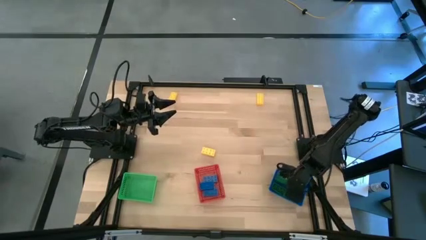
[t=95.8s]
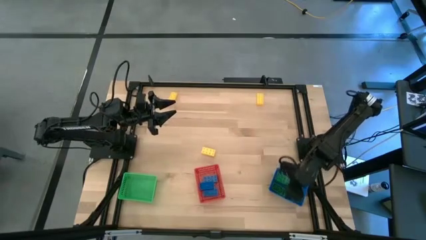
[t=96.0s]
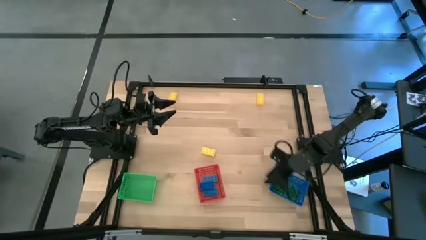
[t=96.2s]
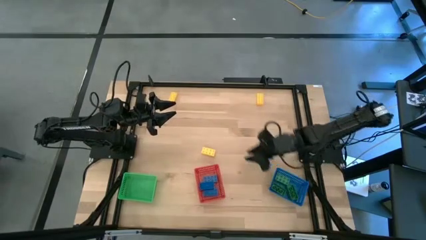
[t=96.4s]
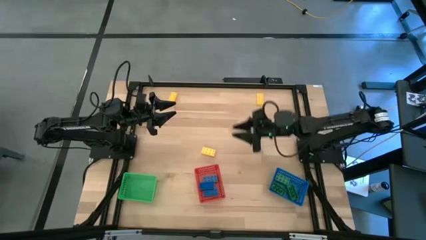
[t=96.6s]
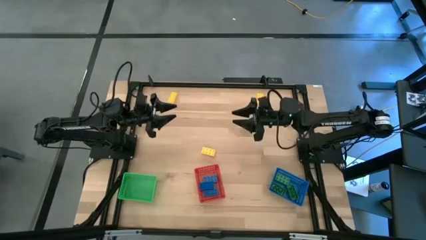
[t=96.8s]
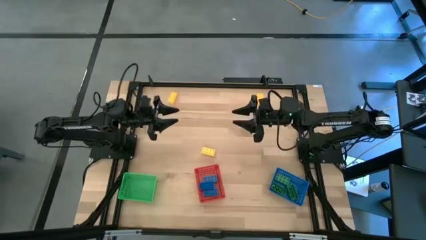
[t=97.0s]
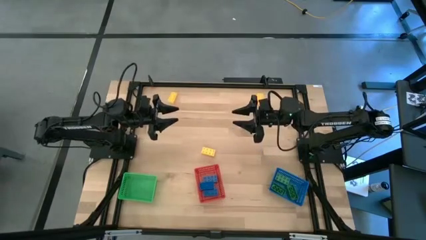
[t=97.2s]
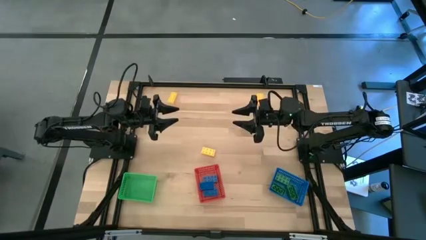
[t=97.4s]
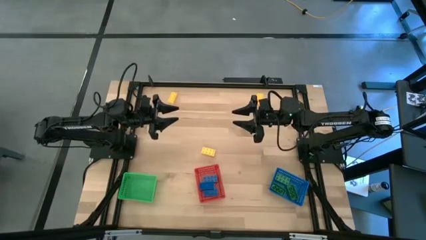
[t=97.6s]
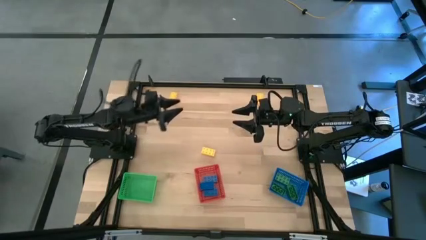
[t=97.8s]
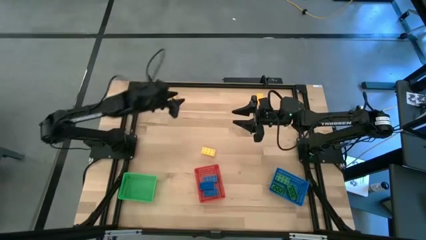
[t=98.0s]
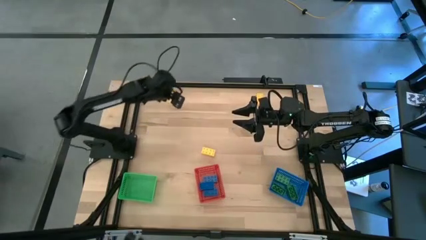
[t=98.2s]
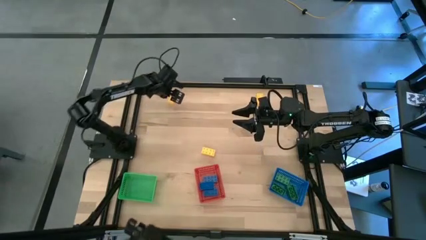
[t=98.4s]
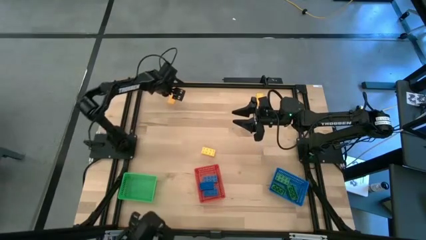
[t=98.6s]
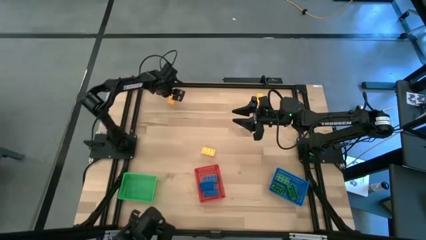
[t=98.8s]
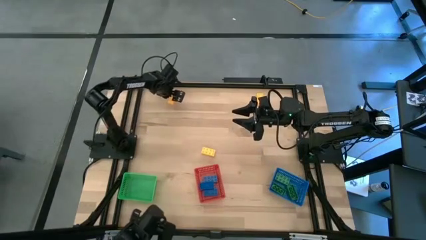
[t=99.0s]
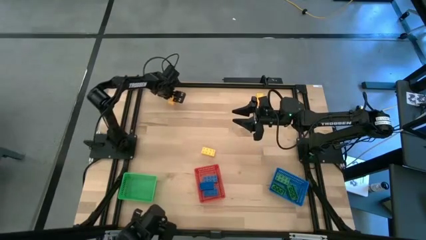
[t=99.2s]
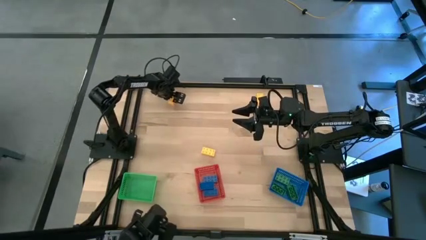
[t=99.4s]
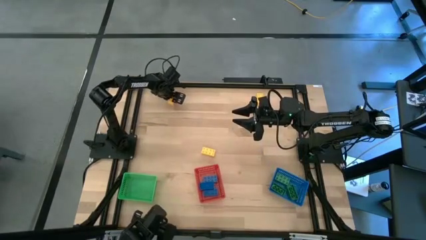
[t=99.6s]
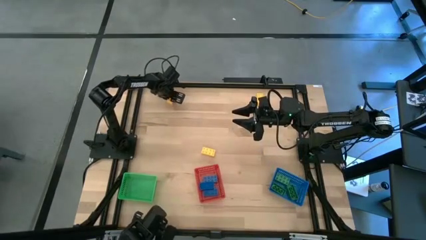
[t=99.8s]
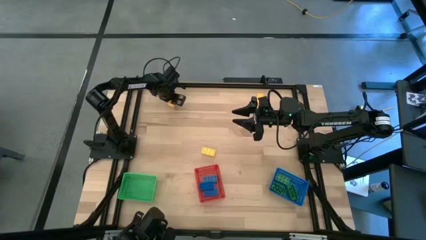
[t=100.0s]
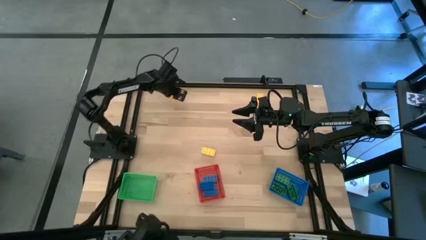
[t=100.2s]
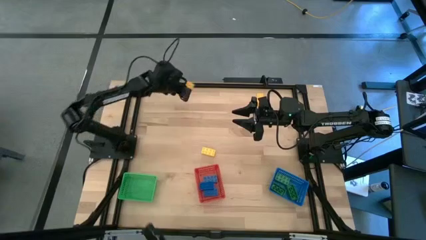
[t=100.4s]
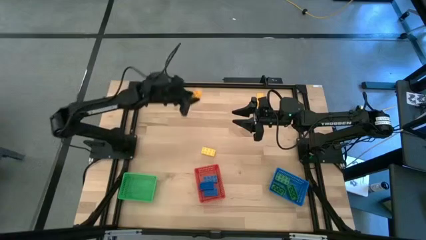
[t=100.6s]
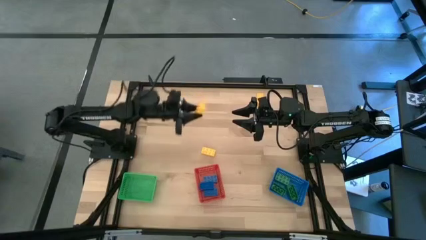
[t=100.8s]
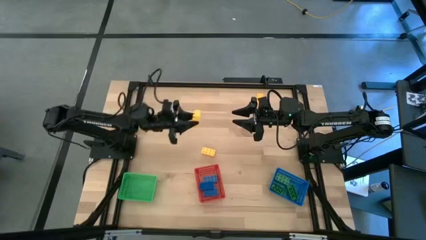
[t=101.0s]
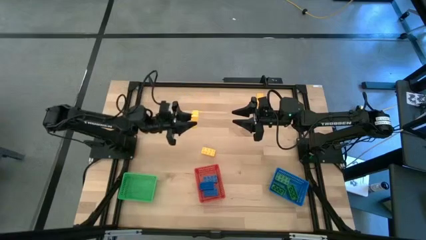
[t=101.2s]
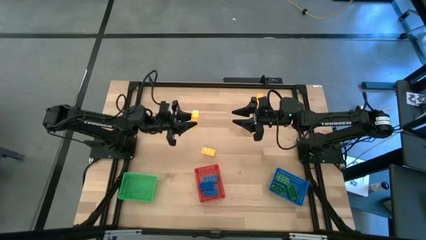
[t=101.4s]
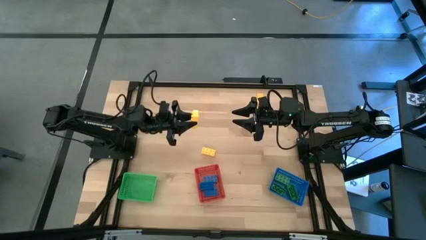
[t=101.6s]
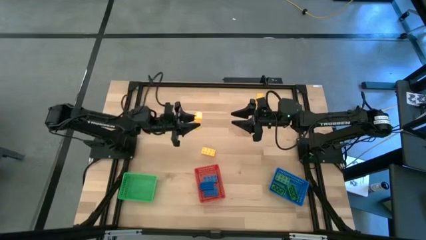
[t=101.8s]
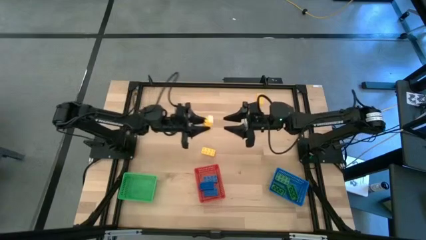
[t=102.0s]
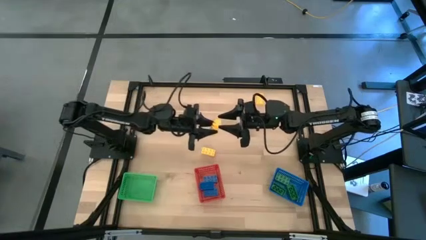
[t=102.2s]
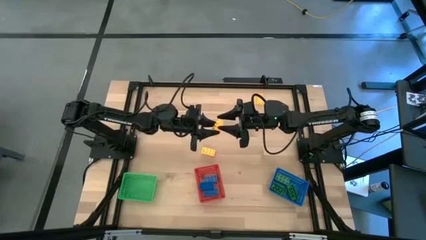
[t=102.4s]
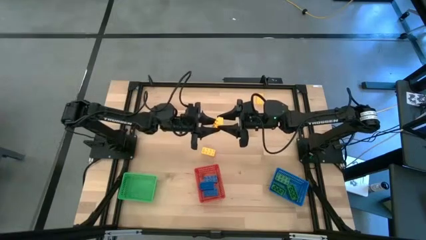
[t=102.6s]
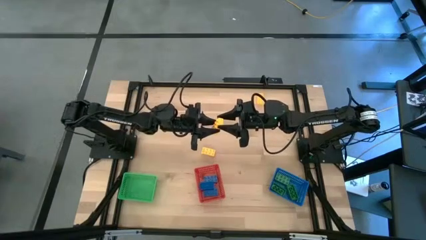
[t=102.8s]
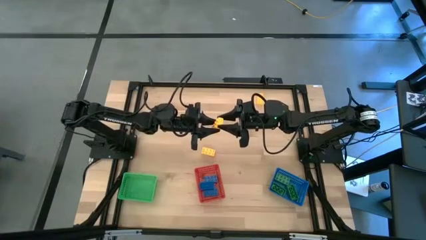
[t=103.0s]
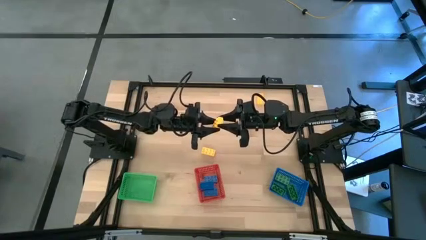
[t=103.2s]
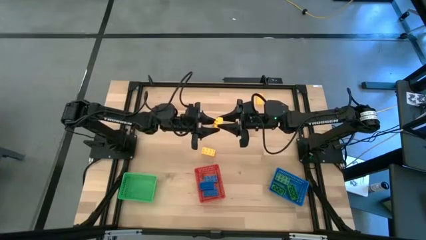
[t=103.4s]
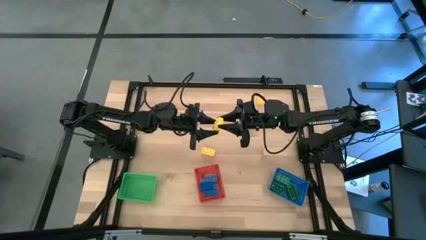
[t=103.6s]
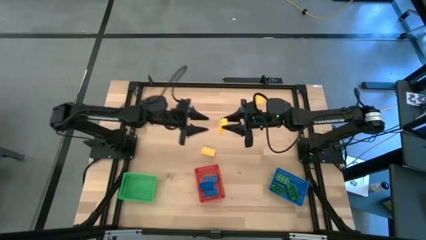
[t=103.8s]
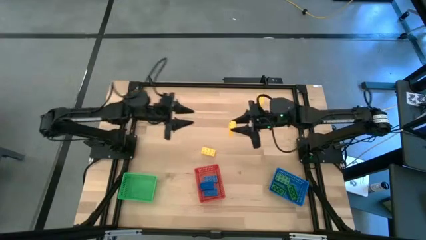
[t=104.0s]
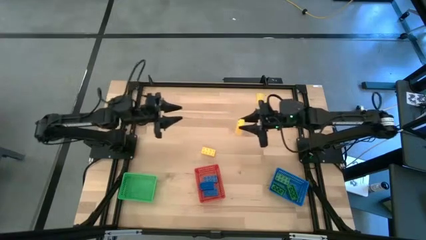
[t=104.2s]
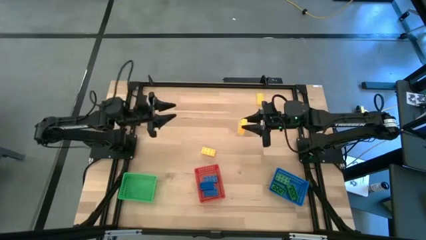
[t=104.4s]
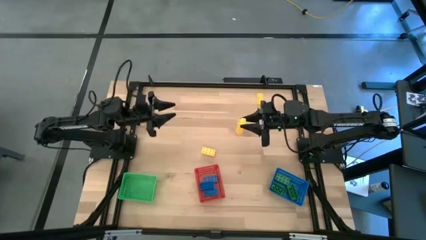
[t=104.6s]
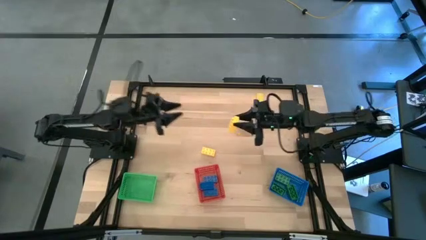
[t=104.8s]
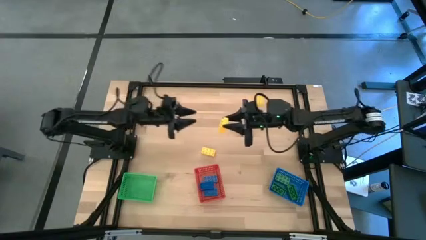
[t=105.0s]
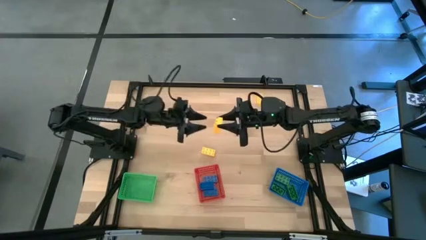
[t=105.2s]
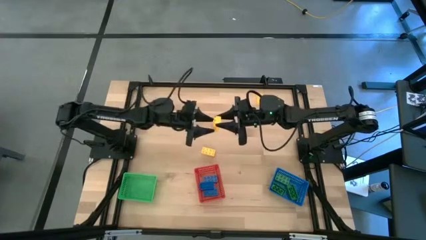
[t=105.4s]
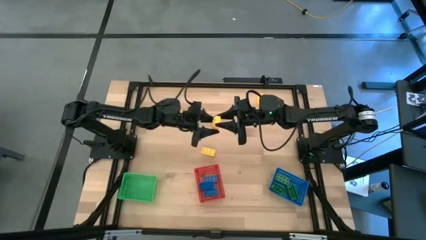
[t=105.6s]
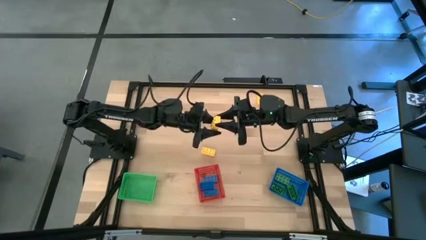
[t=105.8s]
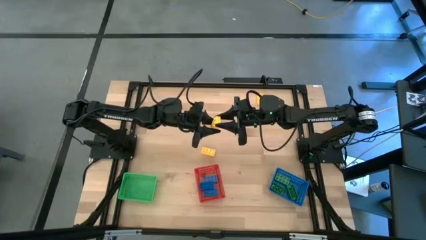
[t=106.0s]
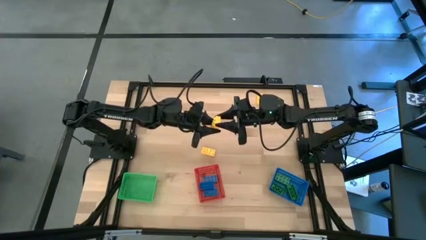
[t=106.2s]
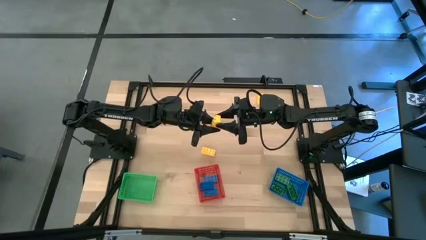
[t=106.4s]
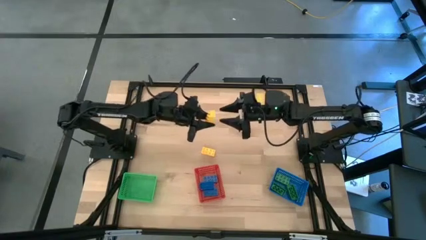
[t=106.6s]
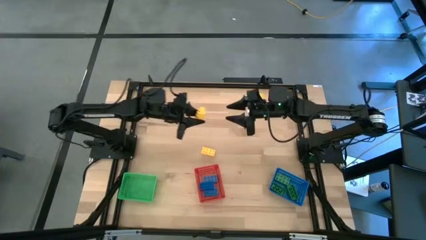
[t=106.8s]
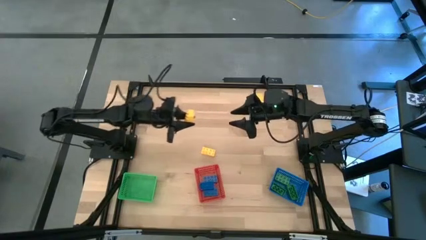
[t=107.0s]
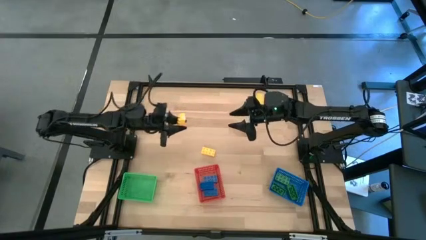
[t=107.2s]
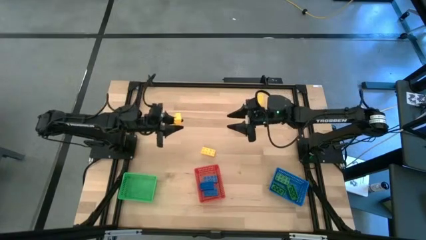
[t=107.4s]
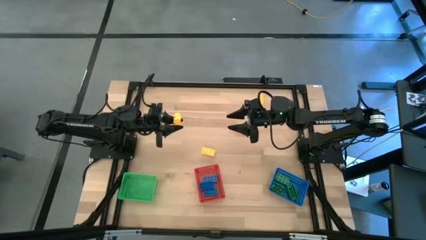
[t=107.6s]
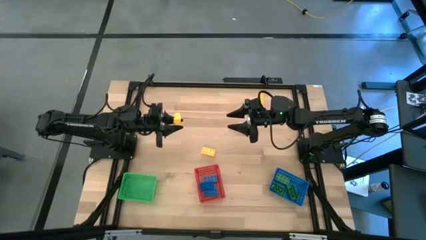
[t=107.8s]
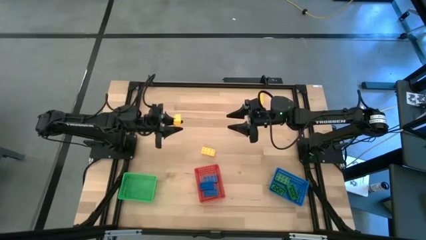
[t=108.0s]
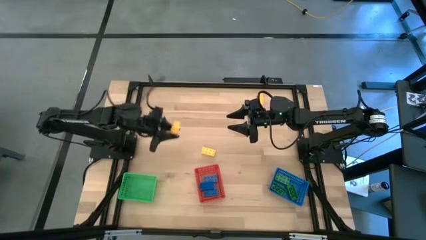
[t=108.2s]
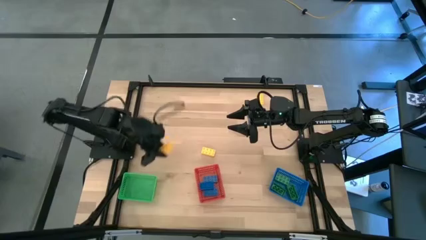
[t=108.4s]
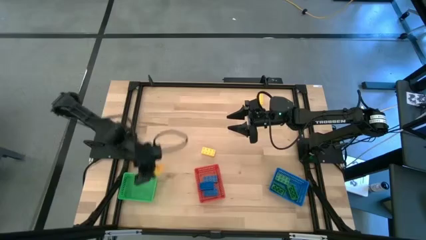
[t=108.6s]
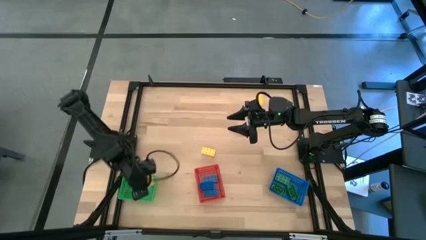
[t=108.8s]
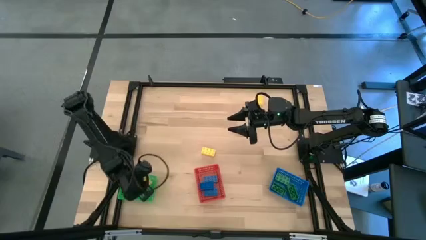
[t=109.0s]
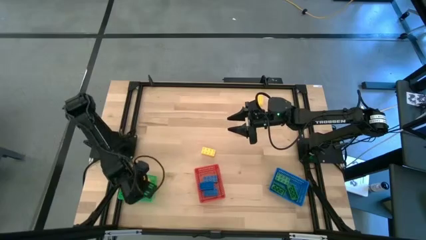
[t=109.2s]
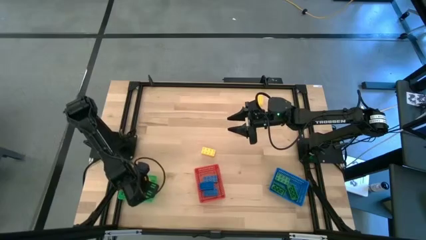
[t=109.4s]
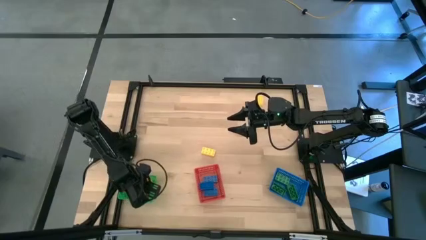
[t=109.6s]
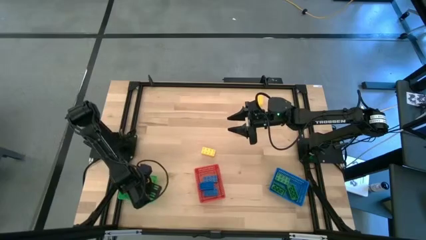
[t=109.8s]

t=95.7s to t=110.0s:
Task: Sort & place blocks by color
Put the left yellow game piece into the green bin
